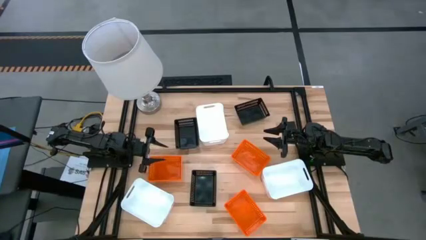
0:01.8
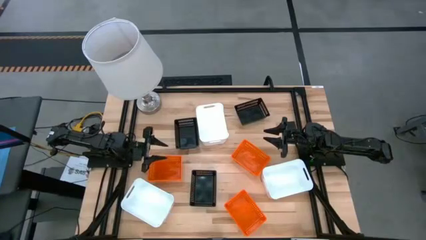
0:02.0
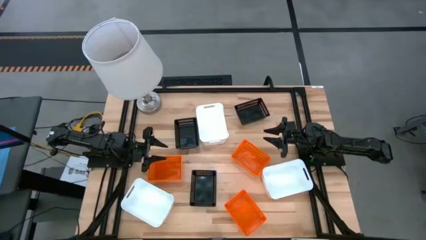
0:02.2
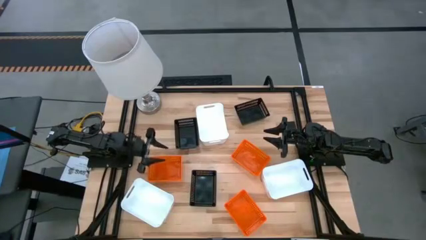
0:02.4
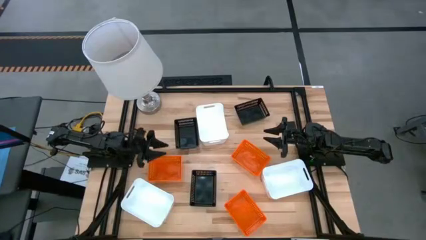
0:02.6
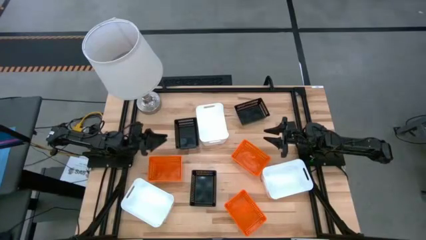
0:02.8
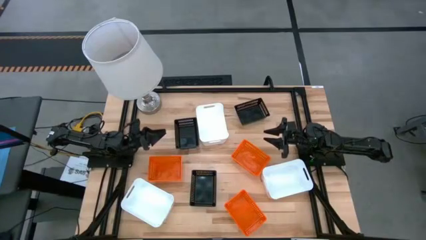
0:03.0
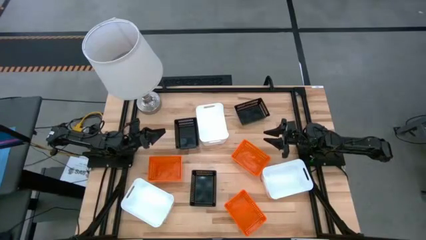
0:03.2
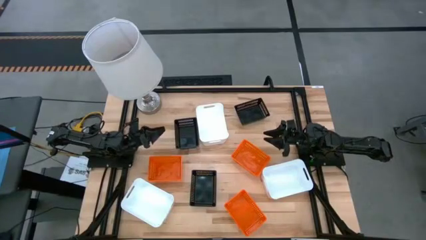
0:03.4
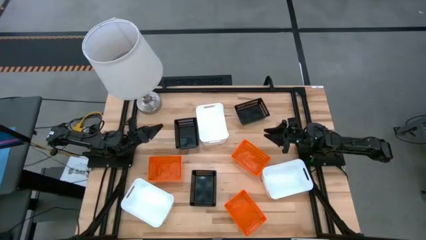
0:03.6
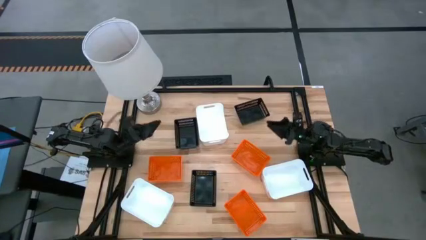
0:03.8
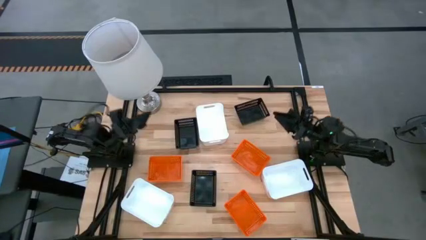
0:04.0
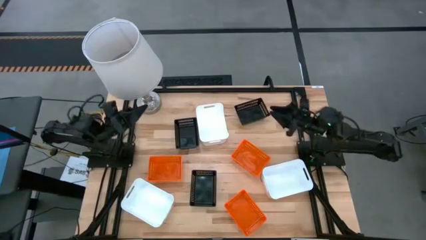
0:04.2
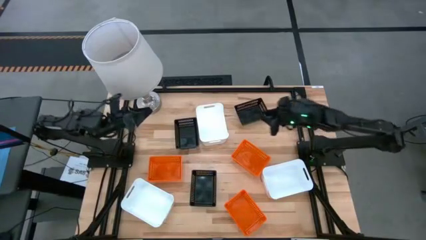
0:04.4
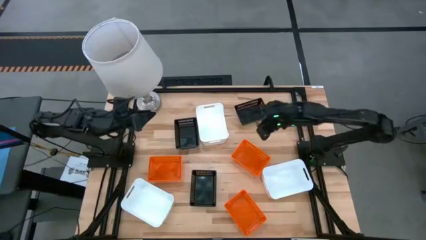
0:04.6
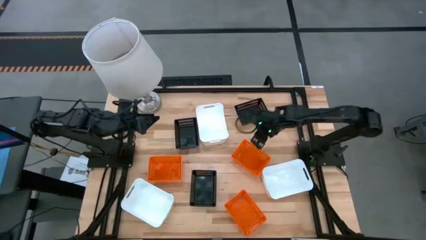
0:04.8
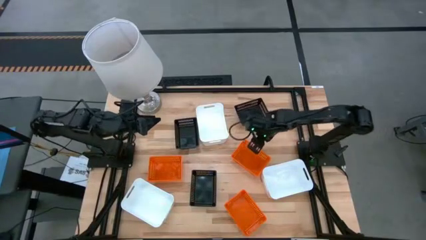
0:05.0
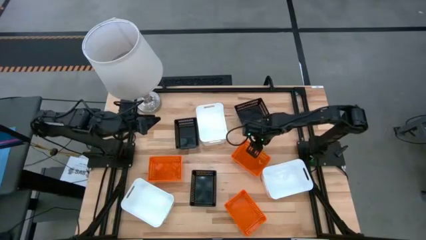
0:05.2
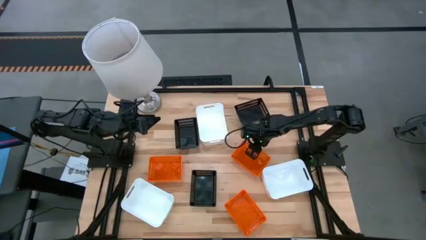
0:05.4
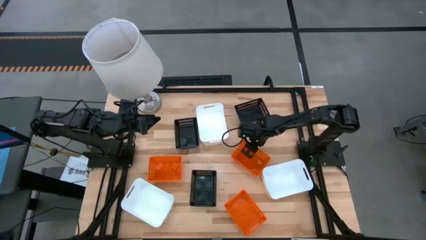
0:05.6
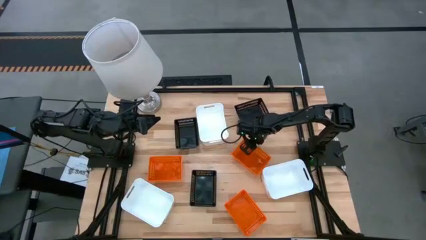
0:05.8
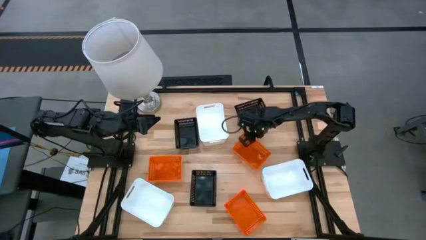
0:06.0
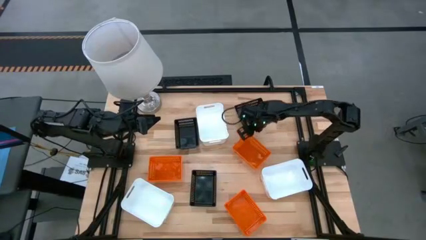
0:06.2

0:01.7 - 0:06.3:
Adjust the top right orange bin

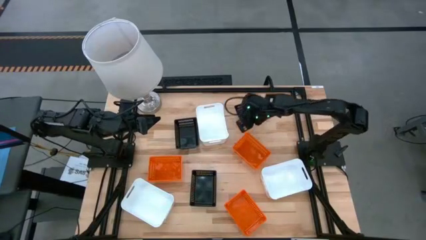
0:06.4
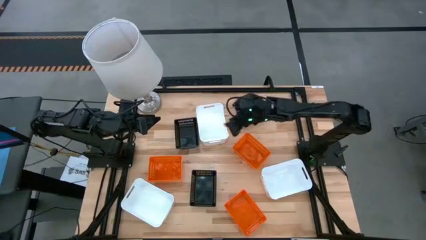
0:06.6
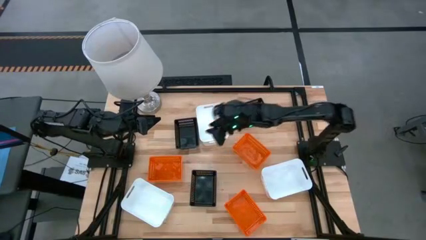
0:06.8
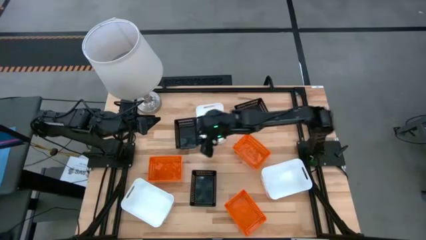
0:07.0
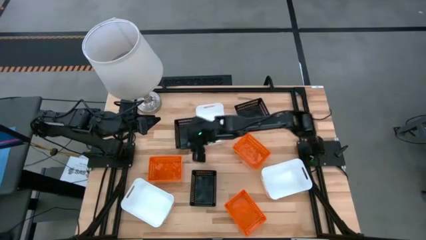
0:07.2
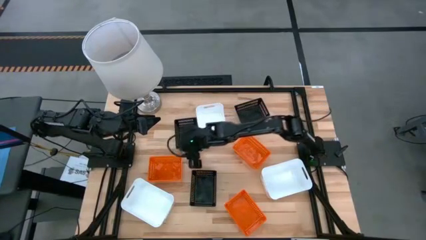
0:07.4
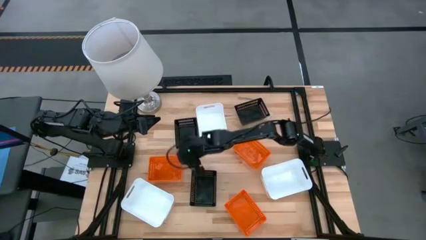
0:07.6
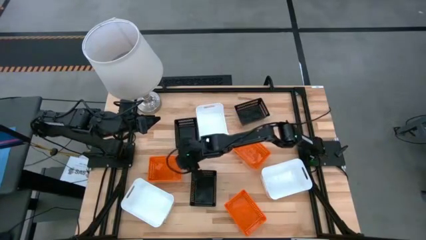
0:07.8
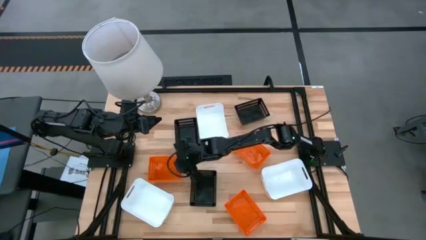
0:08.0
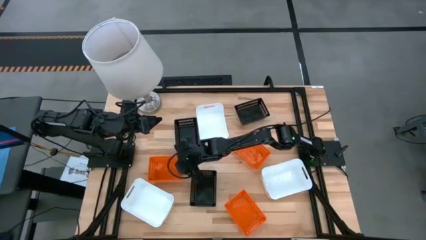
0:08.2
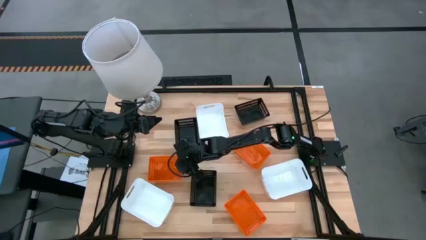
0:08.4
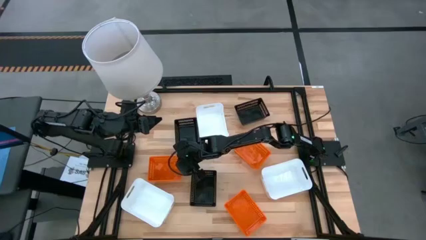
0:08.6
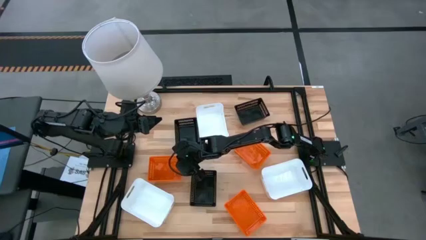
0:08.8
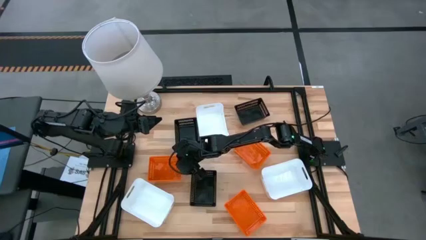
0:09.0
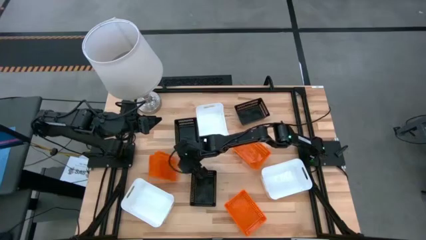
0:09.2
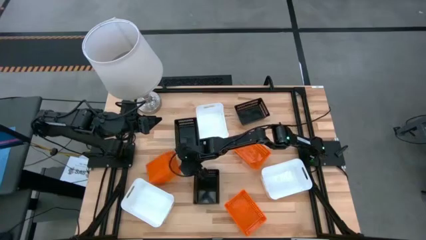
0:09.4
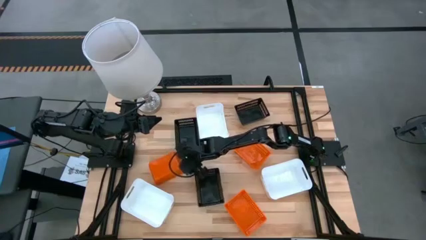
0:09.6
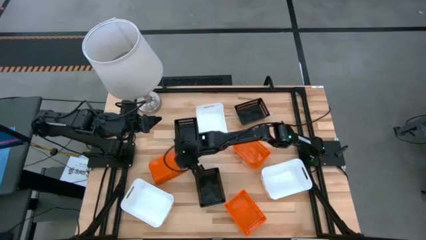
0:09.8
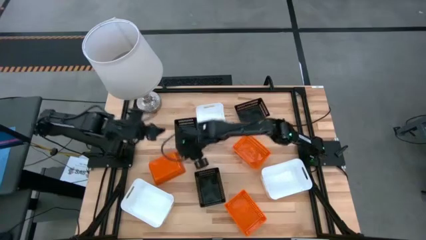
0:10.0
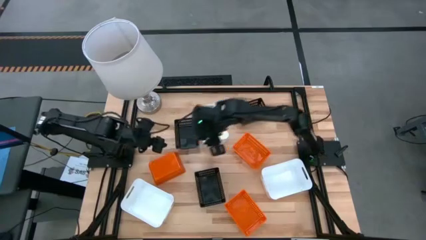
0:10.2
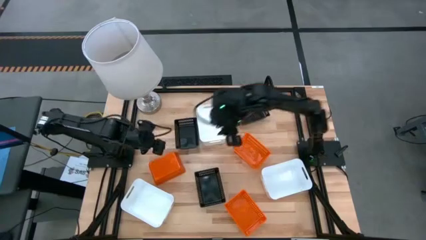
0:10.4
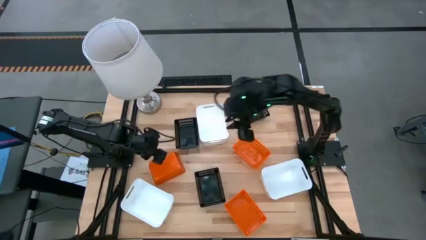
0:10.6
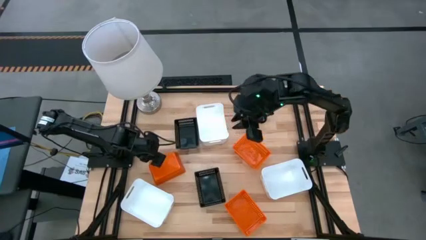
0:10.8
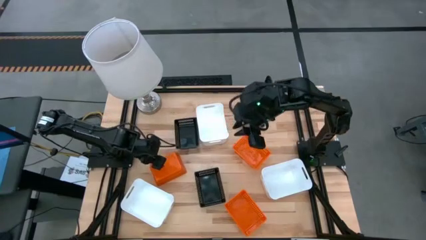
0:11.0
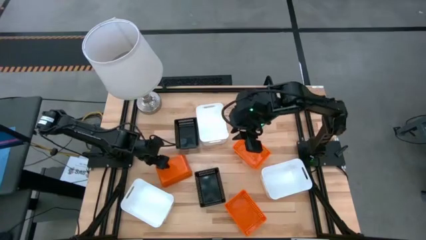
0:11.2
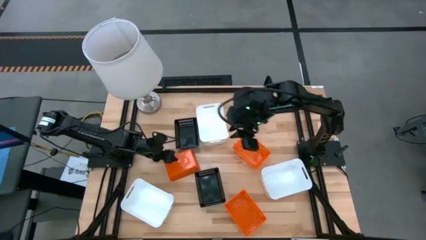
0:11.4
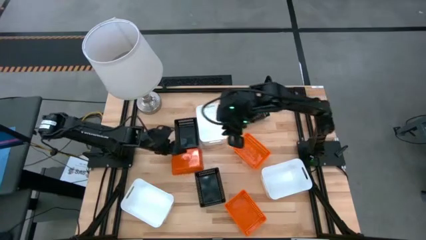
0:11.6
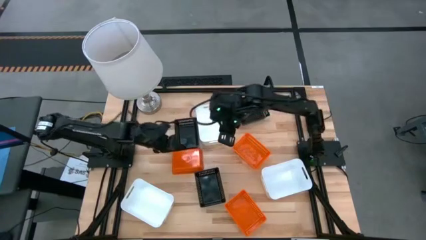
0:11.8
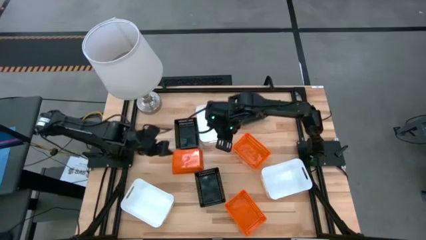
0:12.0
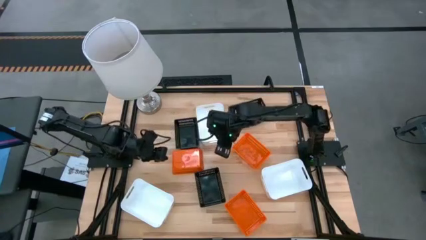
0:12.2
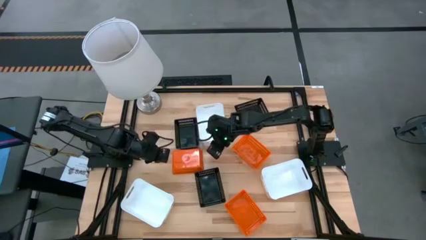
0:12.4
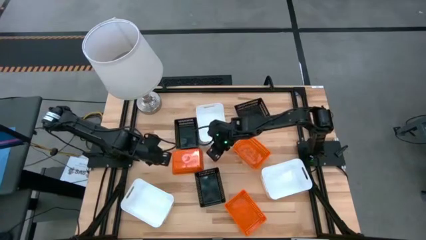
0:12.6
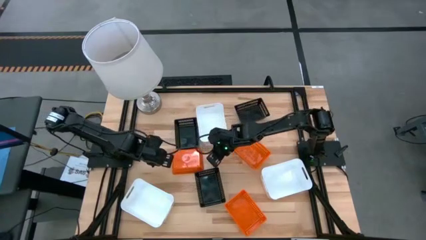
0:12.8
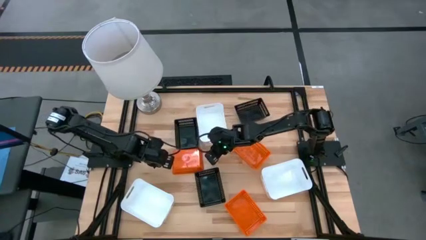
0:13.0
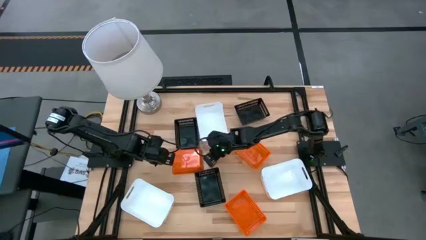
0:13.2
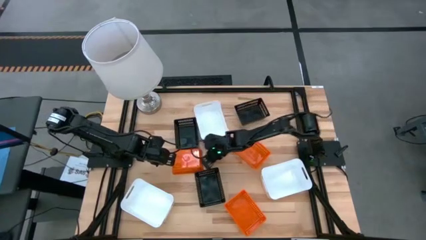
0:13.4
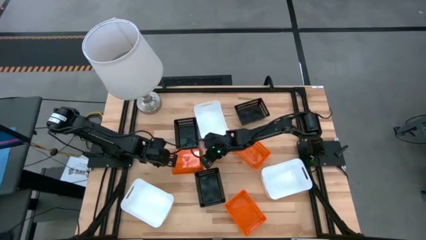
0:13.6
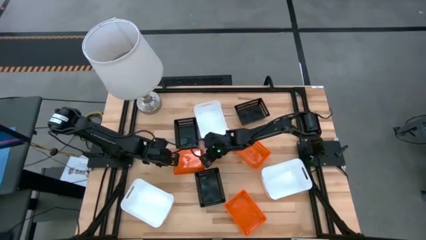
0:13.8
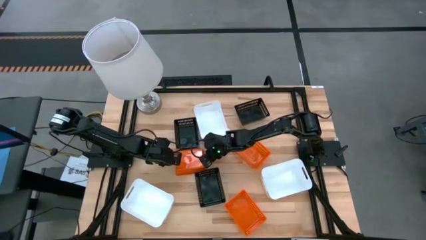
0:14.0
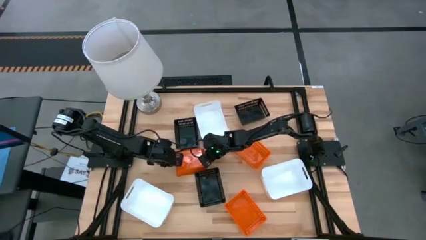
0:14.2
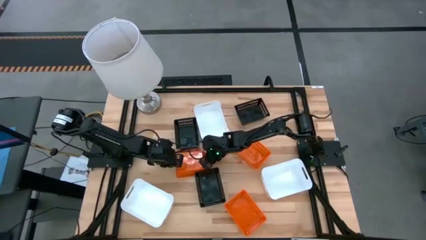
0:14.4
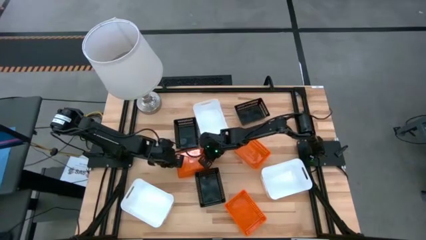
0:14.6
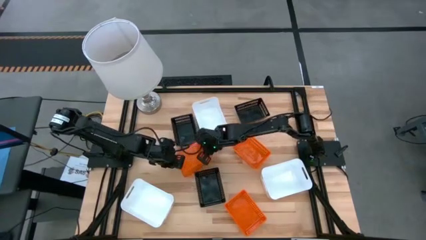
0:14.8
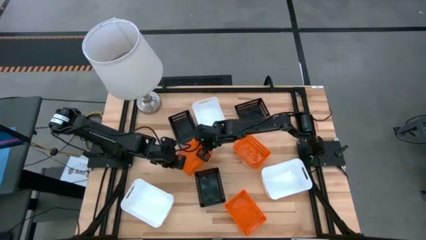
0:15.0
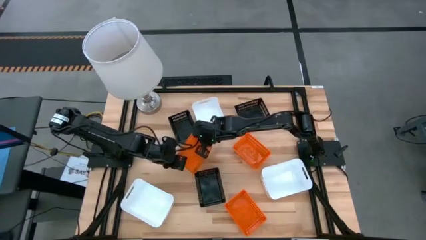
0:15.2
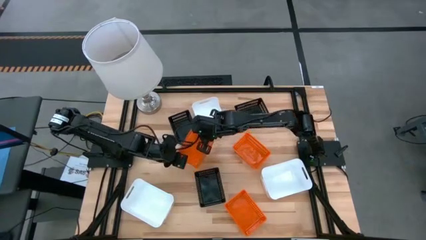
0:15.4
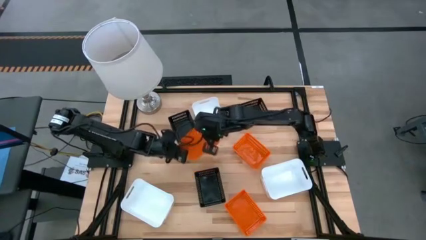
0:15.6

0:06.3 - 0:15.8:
Stack the top left orange bin on the top orange bin

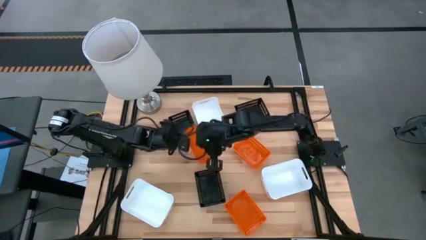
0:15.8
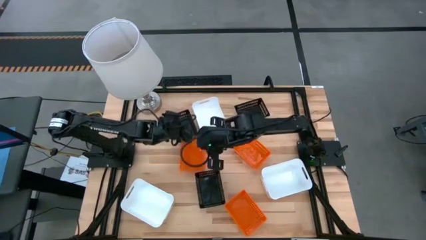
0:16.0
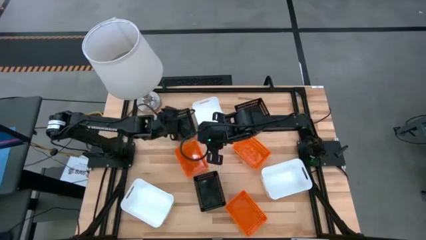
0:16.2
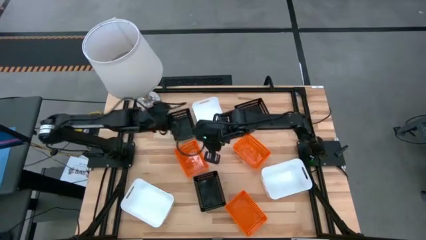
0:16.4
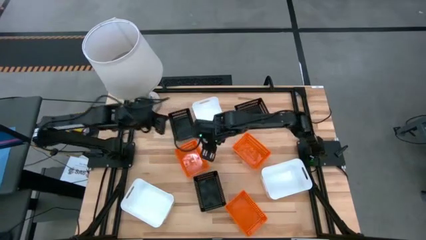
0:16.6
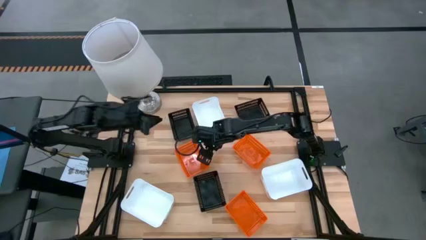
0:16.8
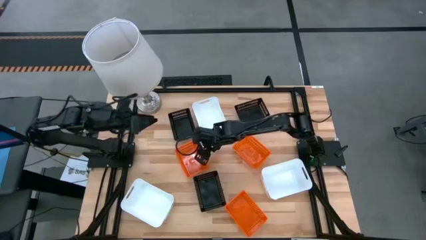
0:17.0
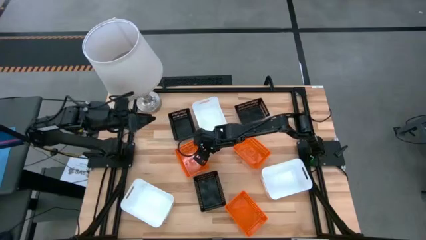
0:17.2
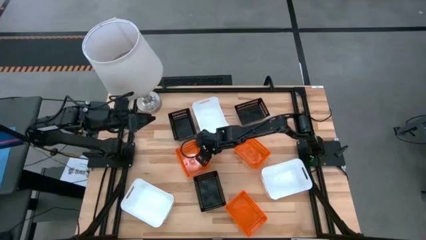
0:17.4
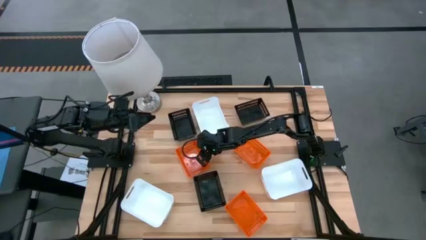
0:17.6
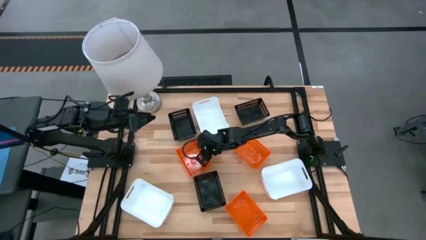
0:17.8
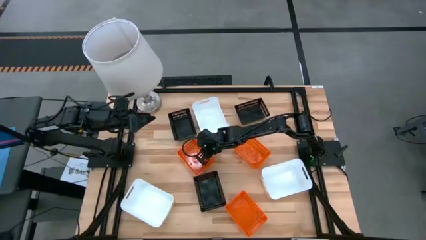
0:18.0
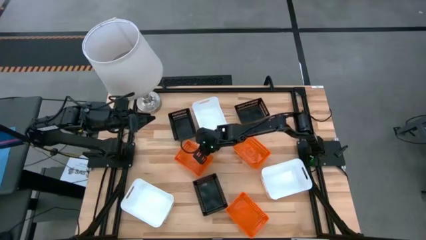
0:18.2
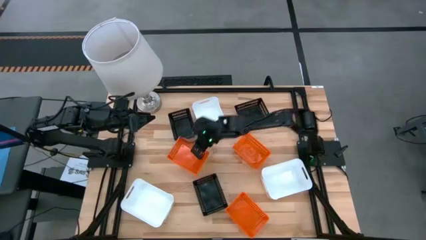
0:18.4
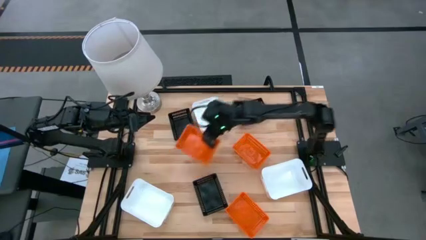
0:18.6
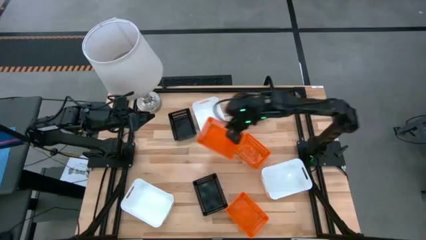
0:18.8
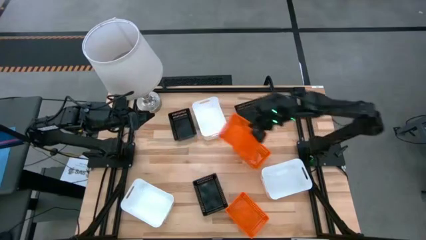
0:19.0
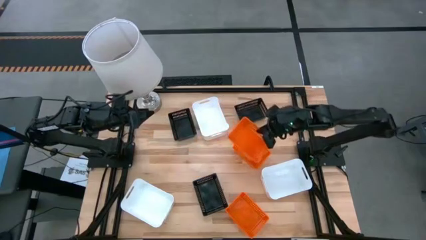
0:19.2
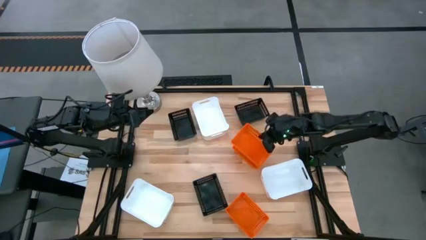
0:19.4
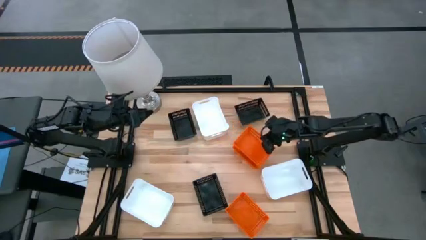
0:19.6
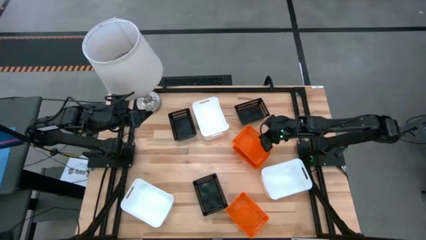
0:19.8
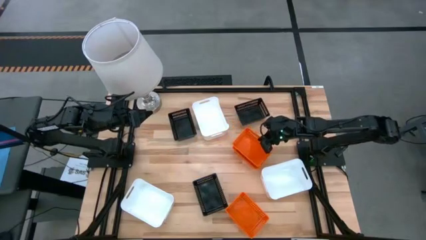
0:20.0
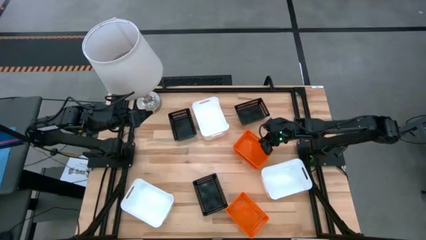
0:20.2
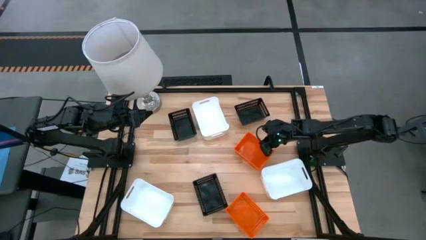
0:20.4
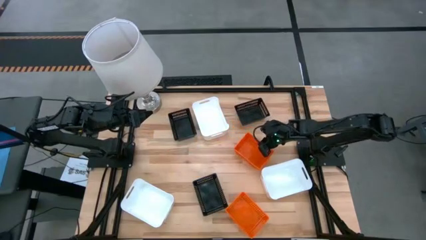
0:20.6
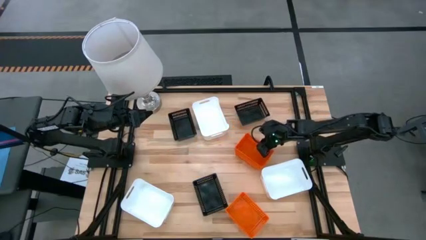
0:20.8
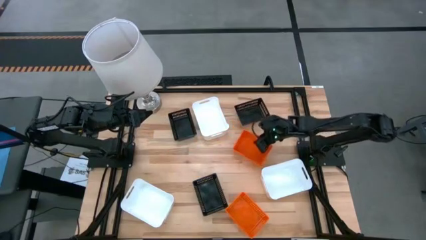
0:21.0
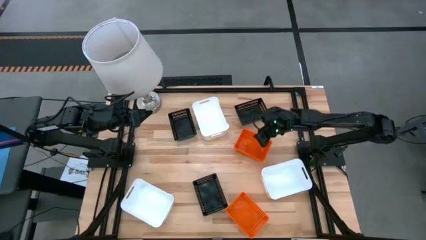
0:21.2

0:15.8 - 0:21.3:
Stack the top left orange bin on the top orange bin
